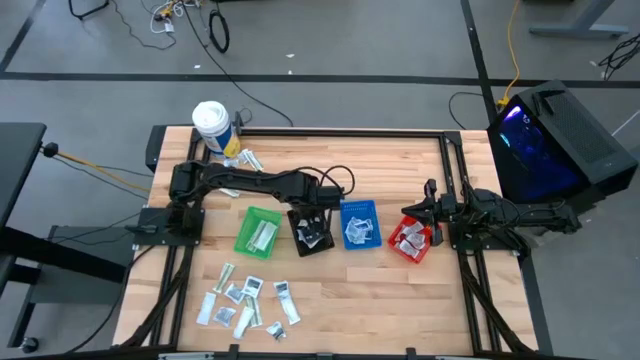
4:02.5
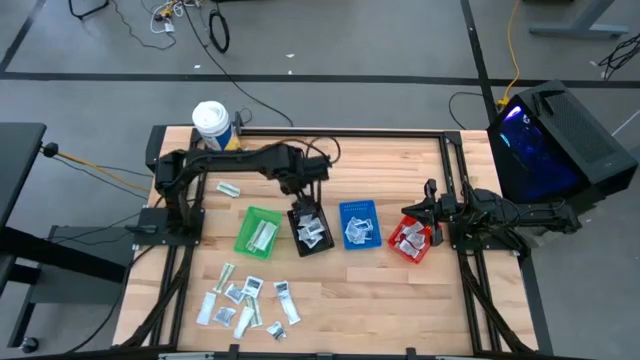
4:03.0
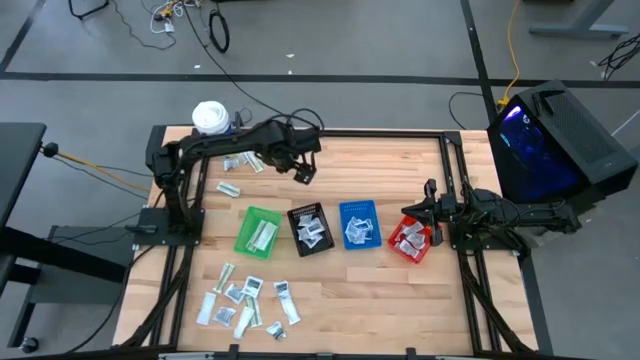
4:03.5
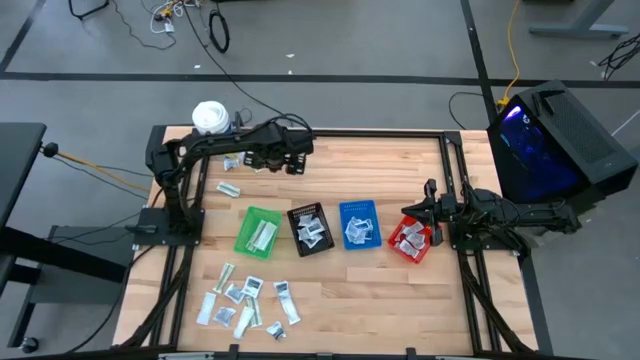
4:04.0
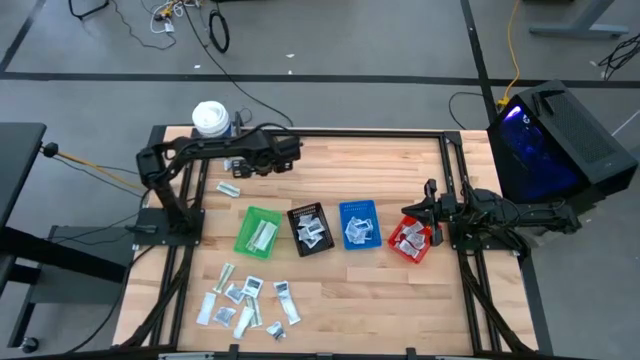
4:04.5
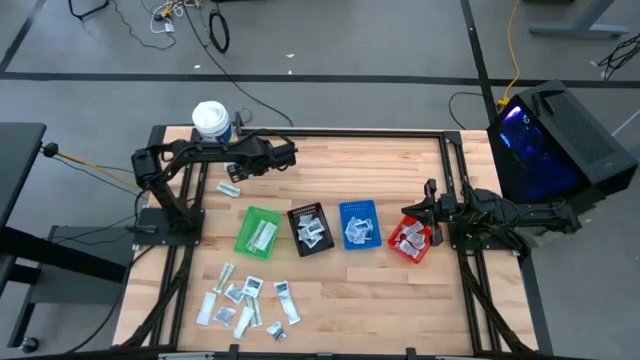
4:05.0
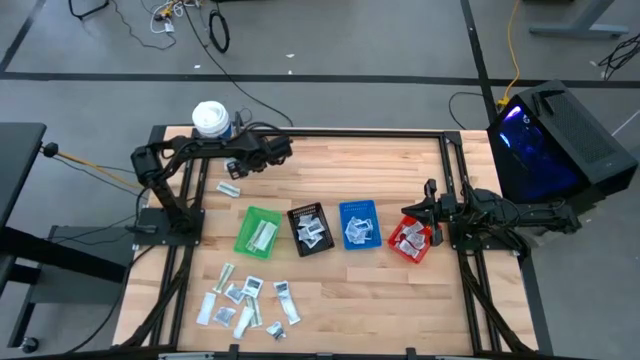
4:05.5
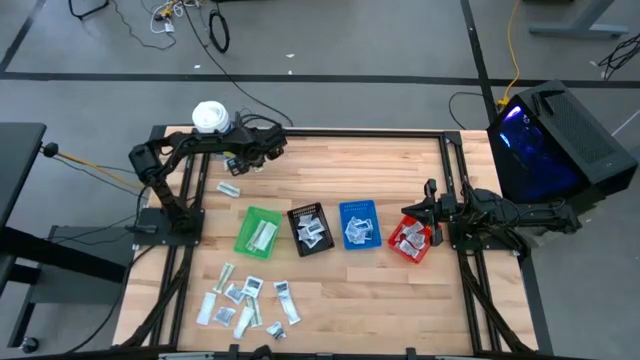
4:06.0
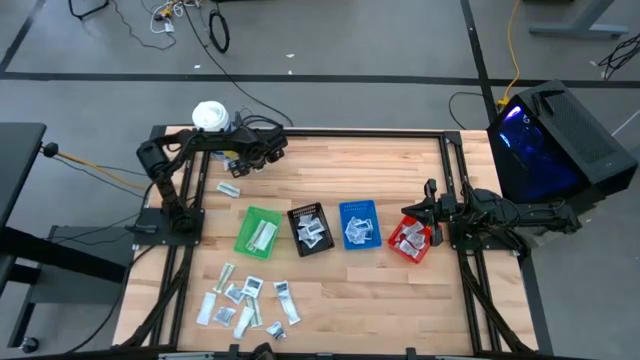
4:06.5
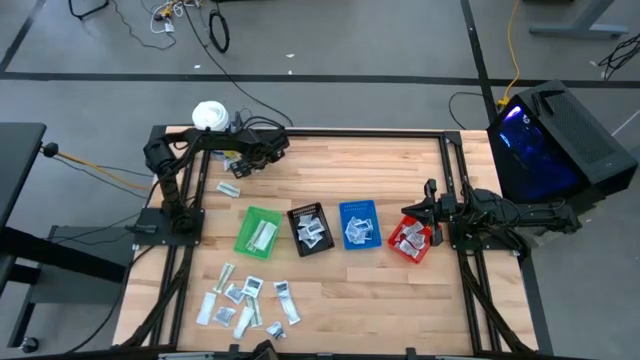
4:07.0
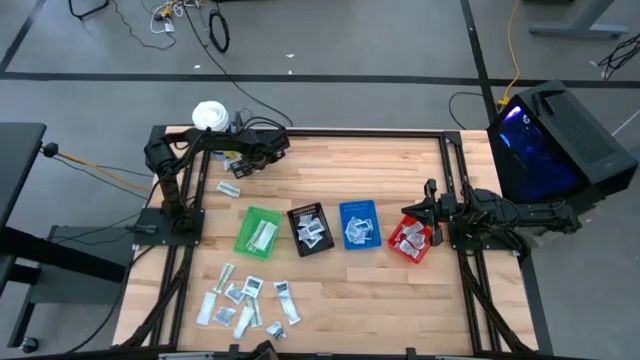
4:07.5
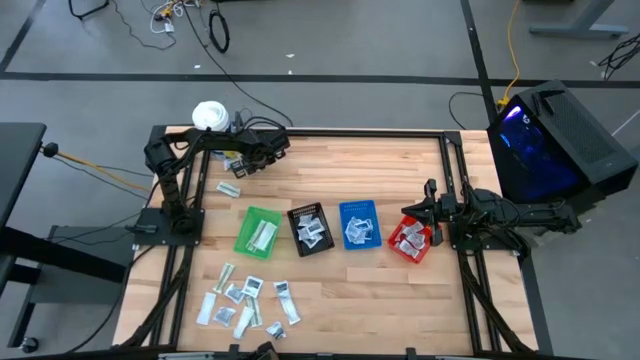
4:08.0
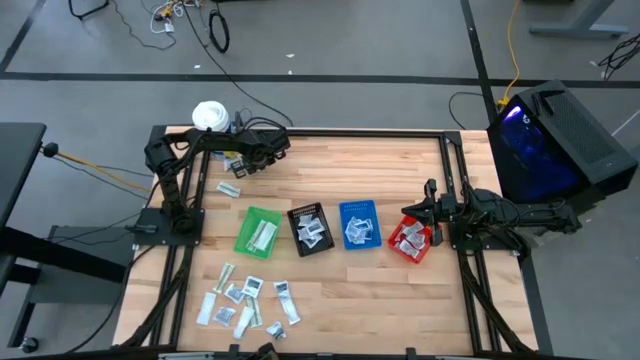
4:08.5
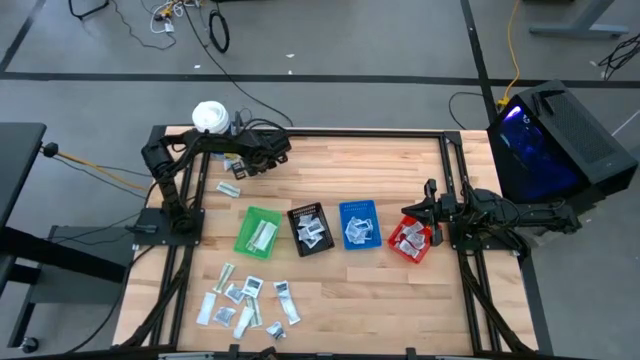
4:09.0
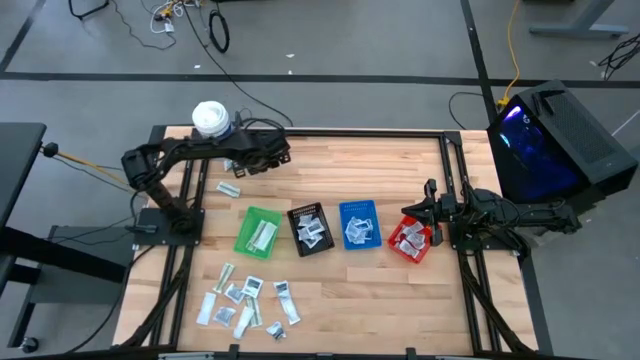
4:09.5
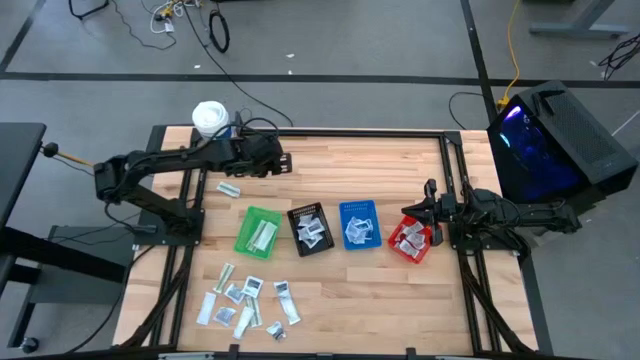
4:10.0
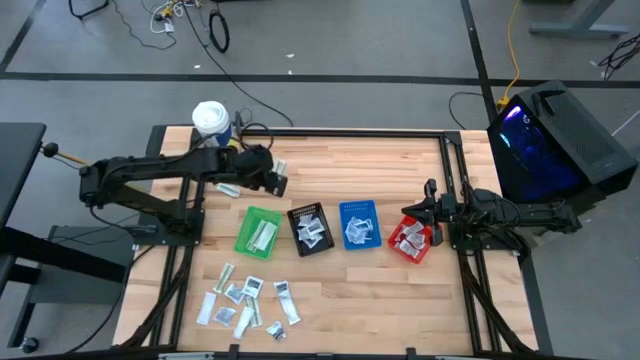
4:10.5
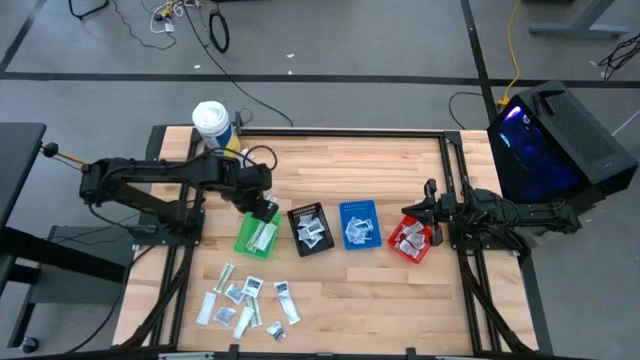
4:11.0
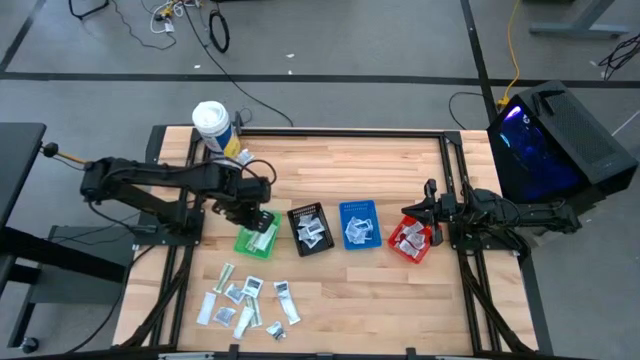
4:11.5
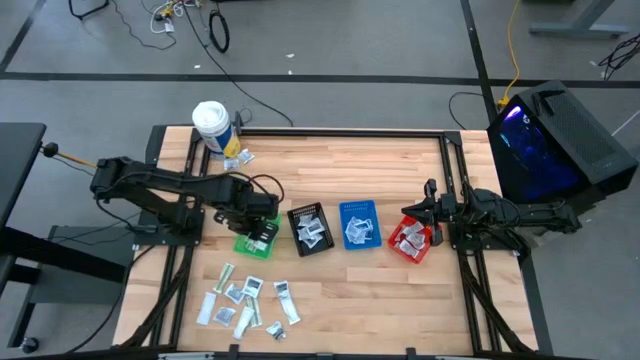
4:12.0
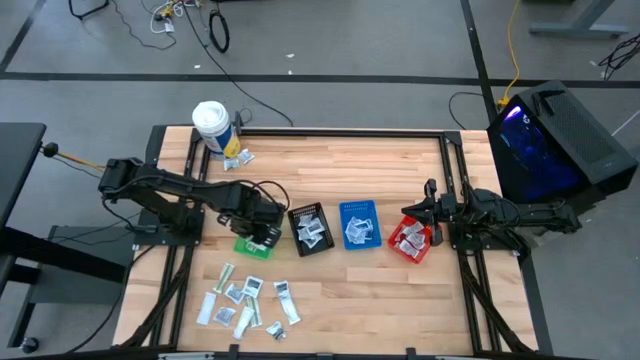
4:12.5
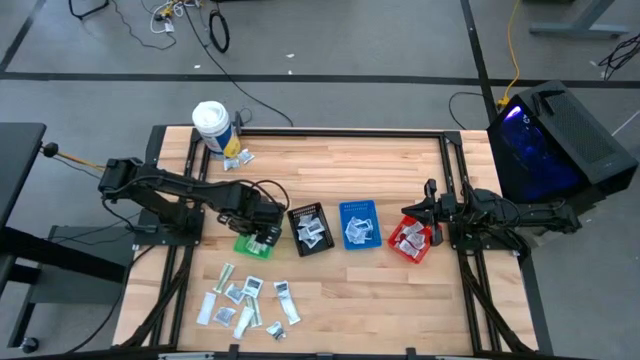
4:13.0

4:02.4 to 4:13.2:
Task: Pick & Place First Aid Supplies
Put the bandage into the green basket

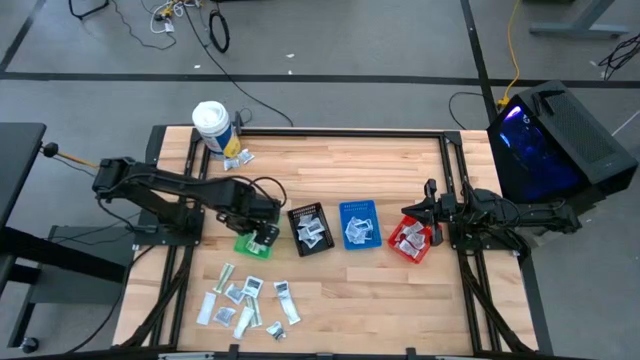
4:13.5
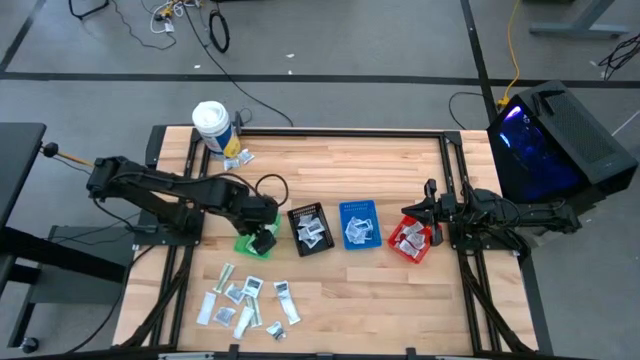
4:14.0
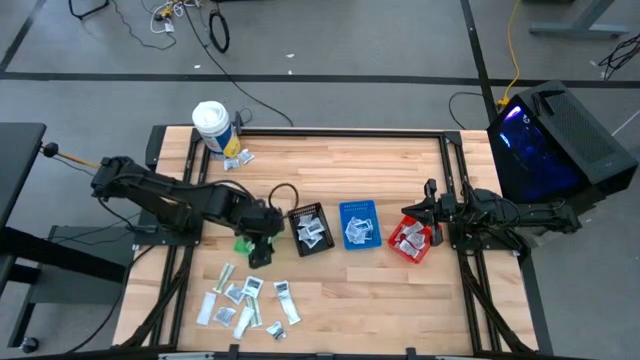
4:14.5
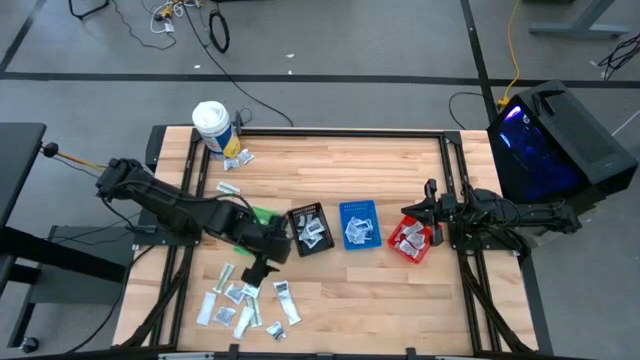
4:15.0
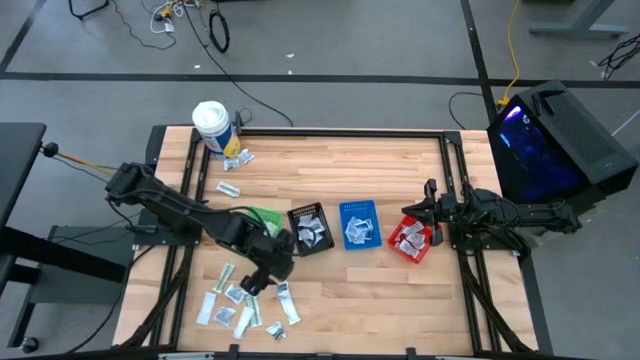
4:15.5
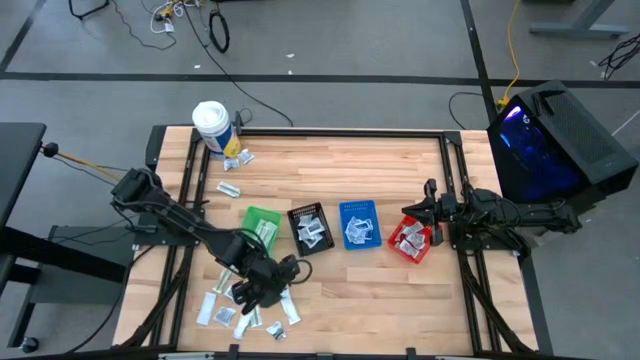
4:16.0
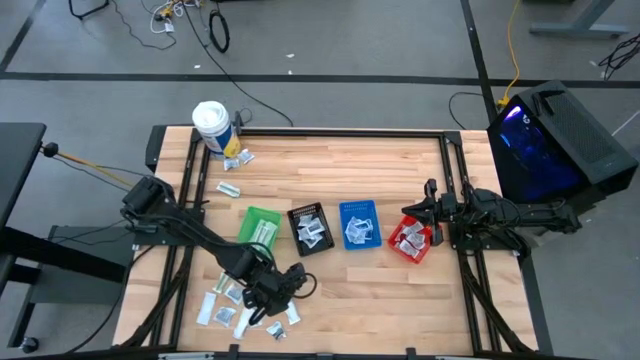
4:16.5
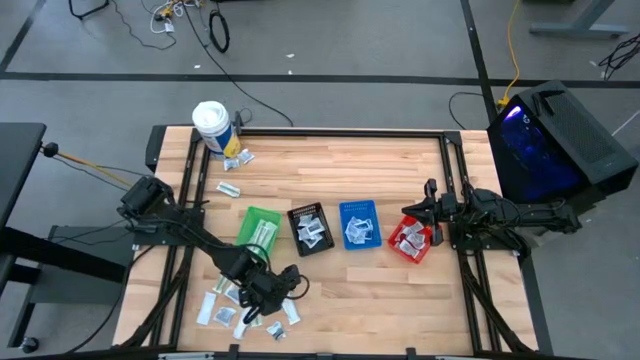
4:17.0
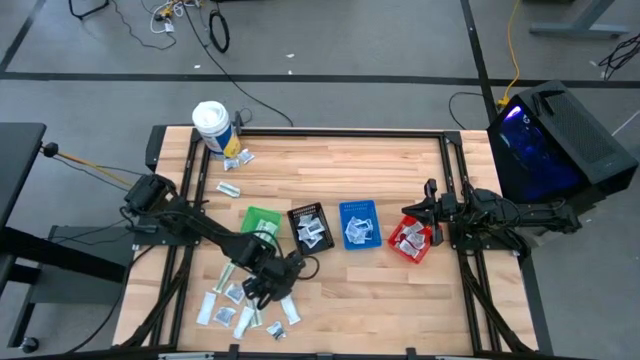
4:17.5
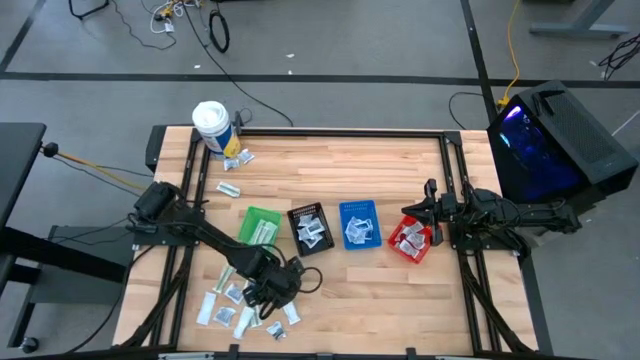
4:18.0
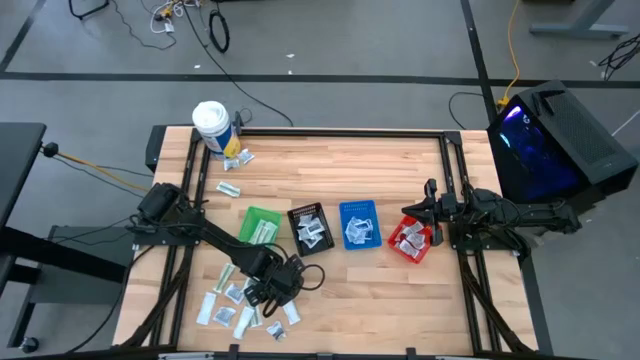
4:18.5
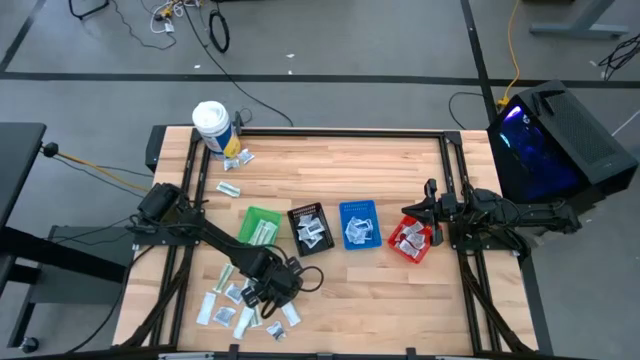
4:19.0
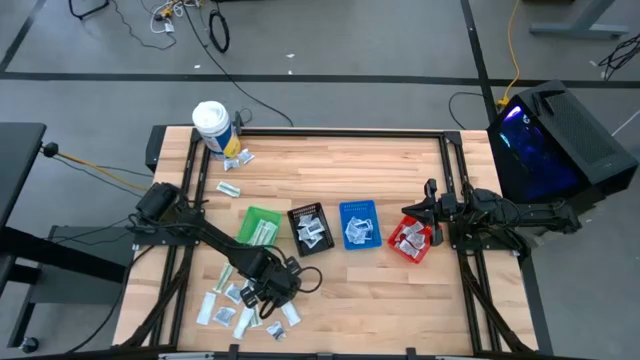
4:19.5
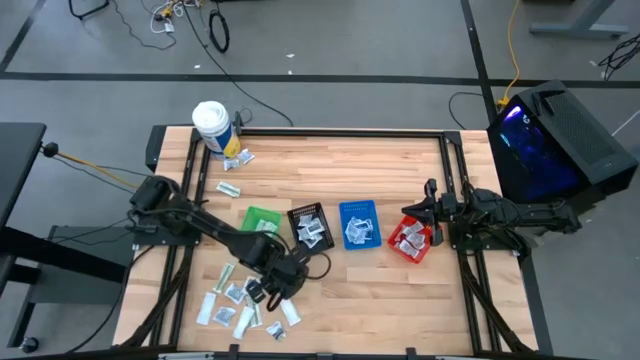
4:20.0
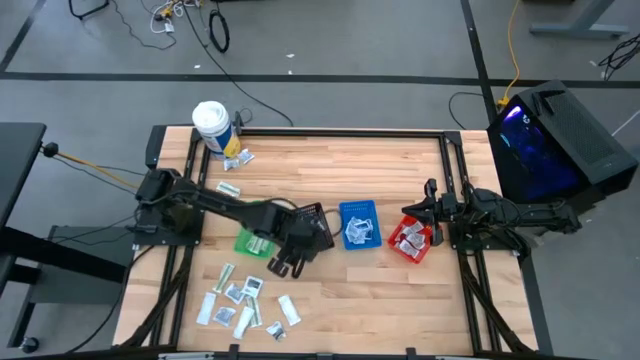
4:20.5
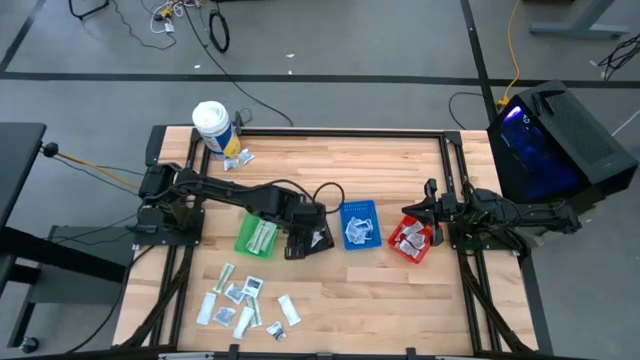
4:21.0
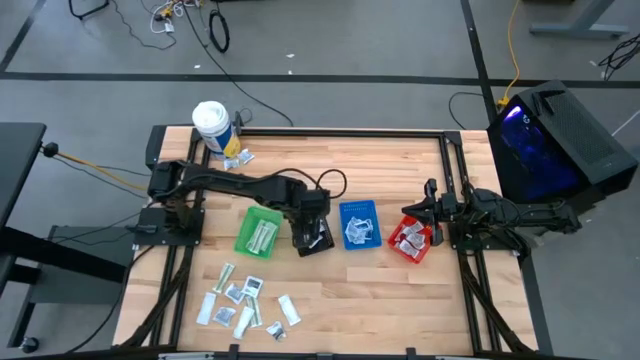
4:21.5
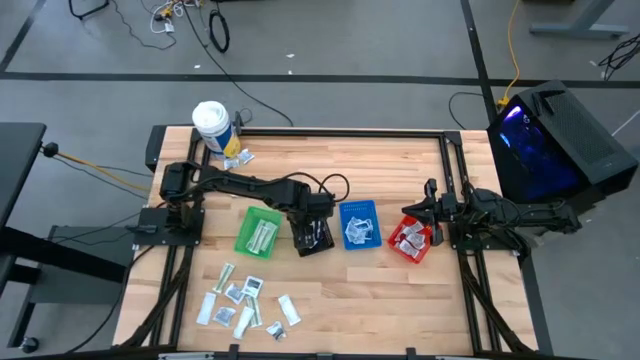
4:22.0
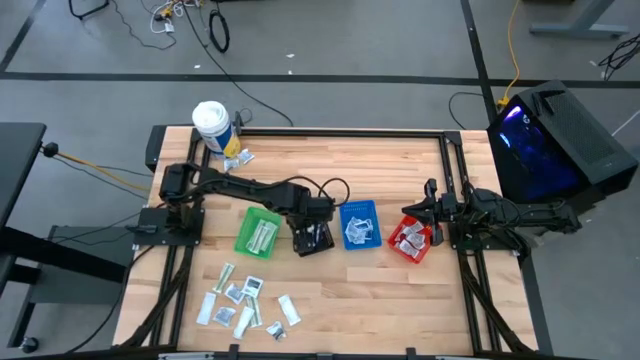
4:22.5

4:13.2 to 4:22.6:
Put the towelette pack into the black basket
